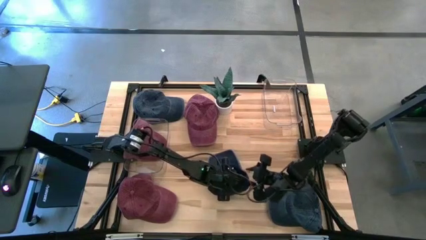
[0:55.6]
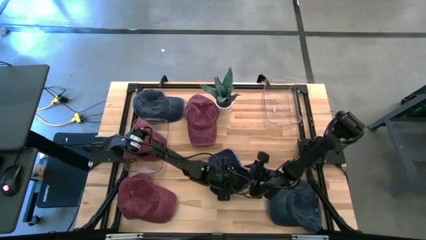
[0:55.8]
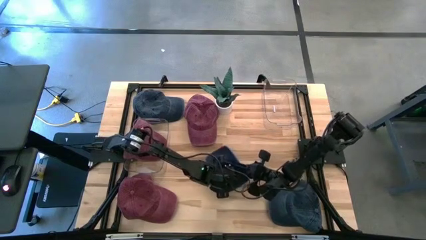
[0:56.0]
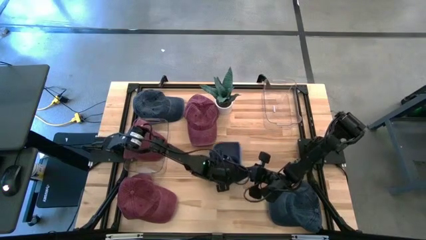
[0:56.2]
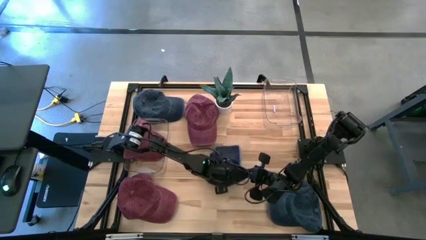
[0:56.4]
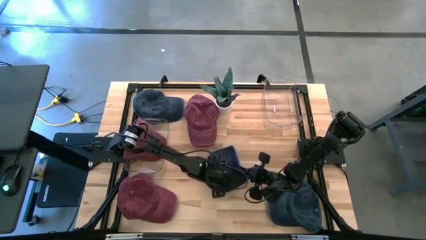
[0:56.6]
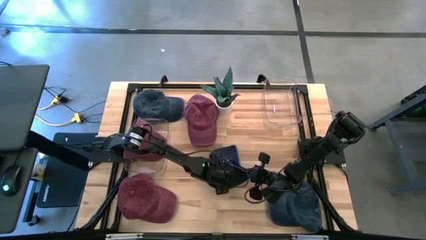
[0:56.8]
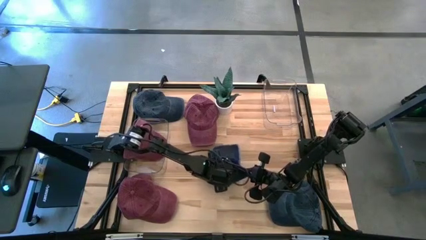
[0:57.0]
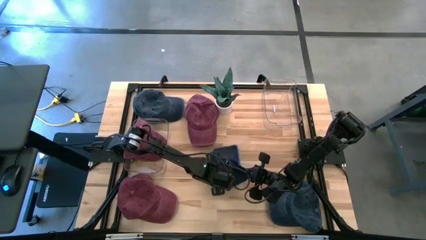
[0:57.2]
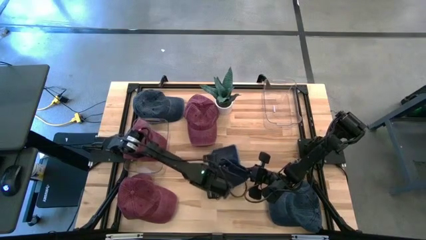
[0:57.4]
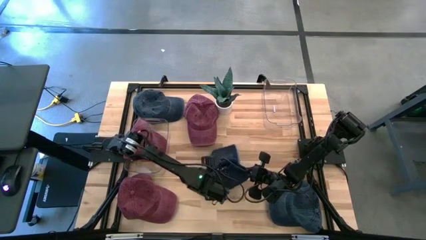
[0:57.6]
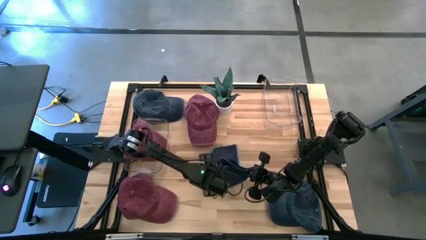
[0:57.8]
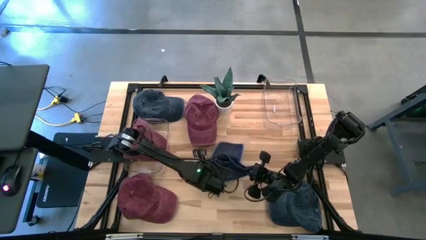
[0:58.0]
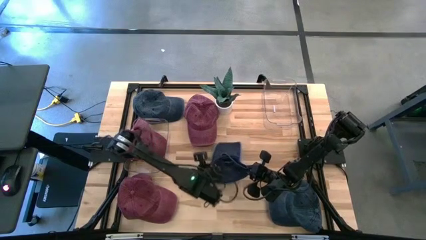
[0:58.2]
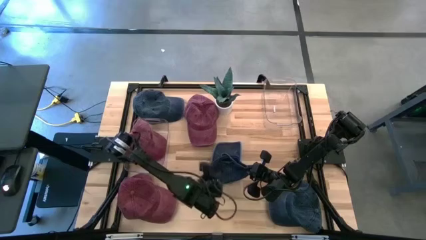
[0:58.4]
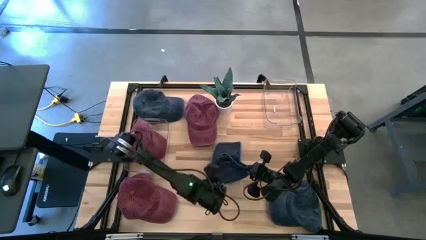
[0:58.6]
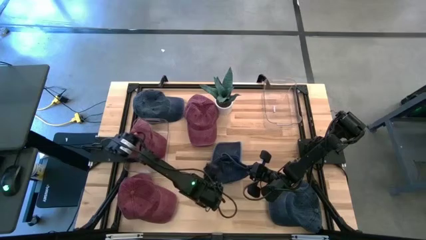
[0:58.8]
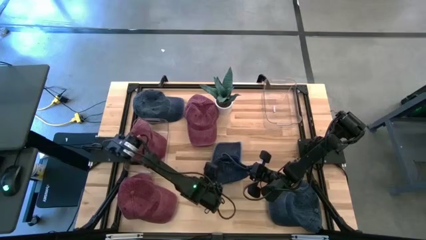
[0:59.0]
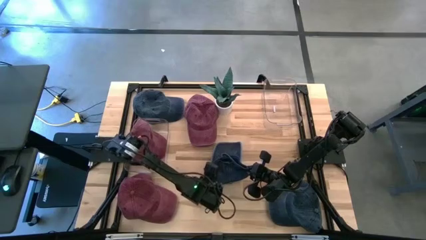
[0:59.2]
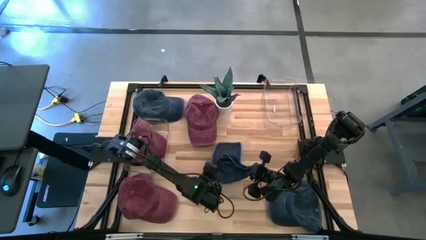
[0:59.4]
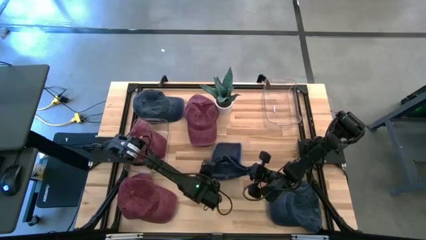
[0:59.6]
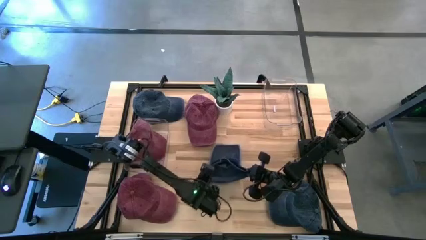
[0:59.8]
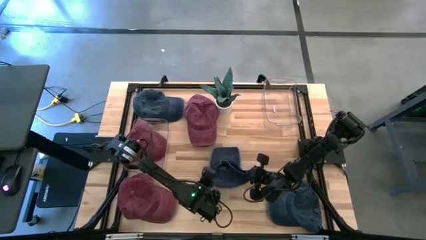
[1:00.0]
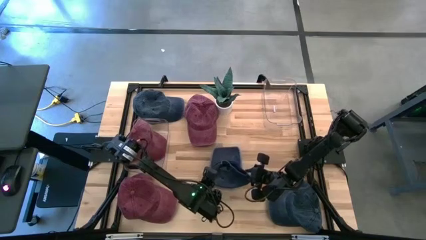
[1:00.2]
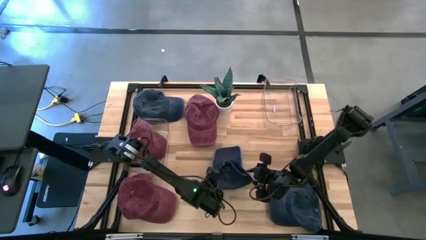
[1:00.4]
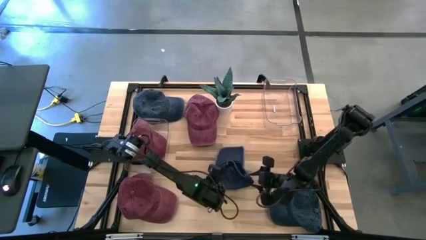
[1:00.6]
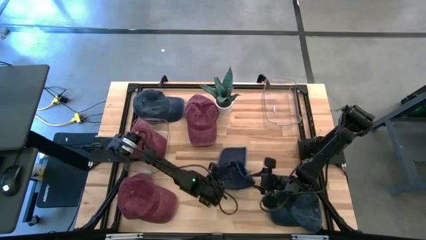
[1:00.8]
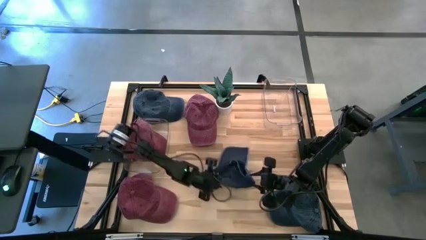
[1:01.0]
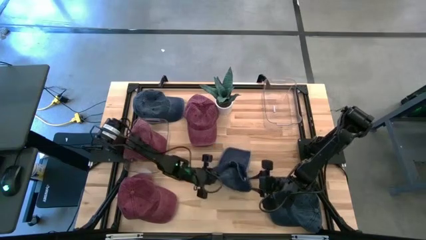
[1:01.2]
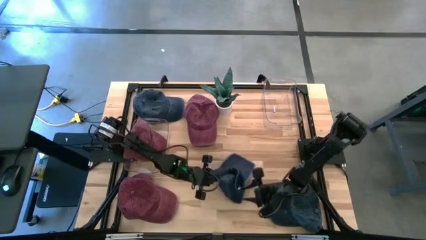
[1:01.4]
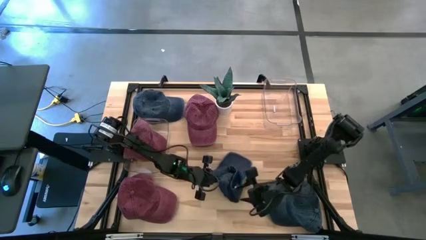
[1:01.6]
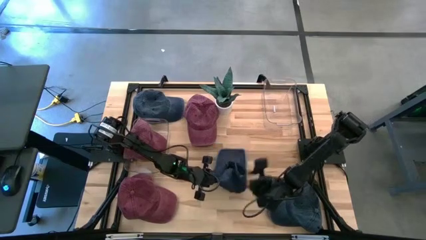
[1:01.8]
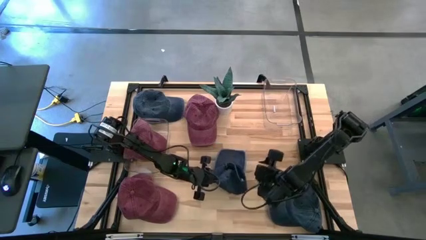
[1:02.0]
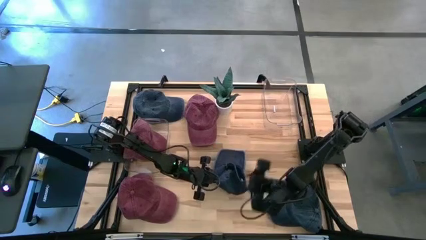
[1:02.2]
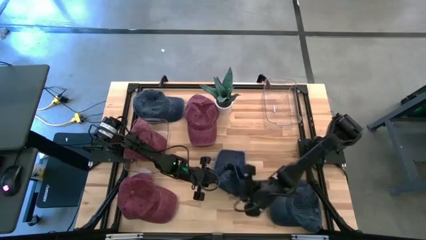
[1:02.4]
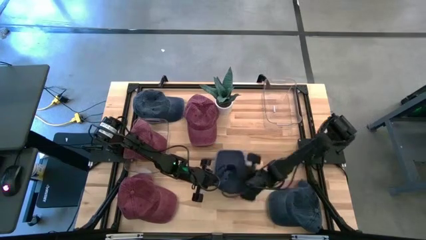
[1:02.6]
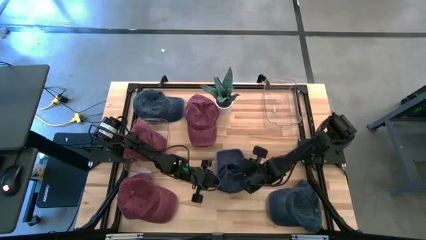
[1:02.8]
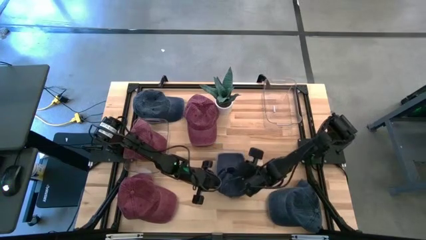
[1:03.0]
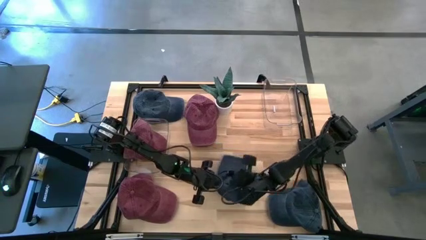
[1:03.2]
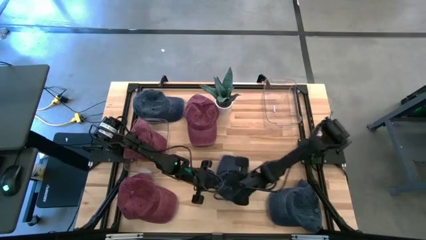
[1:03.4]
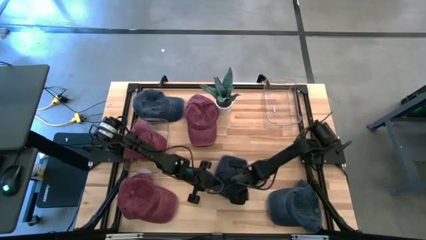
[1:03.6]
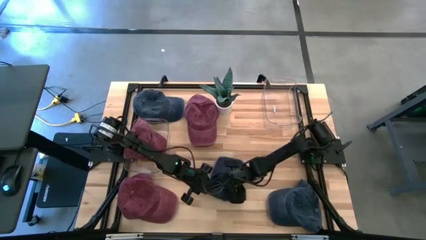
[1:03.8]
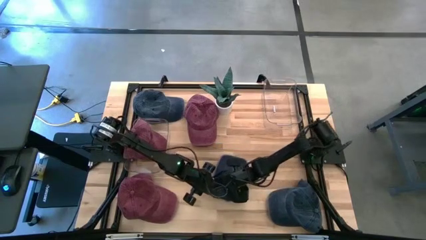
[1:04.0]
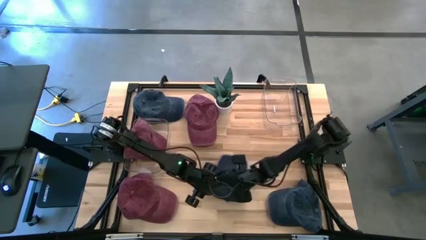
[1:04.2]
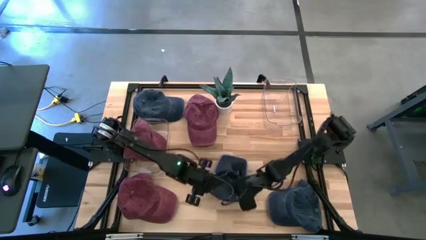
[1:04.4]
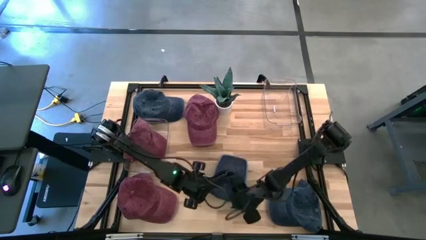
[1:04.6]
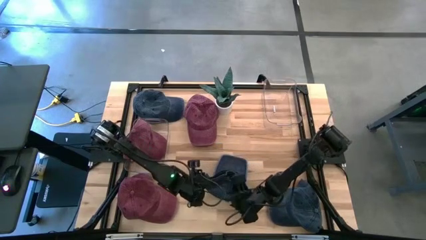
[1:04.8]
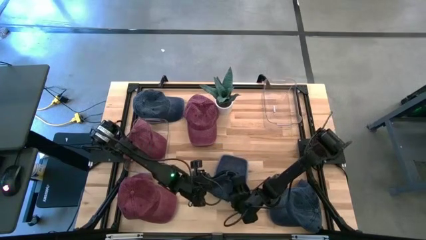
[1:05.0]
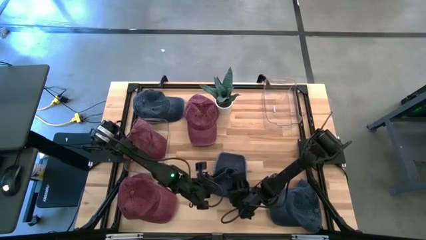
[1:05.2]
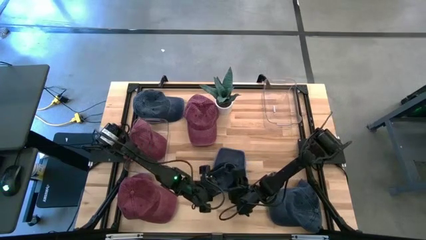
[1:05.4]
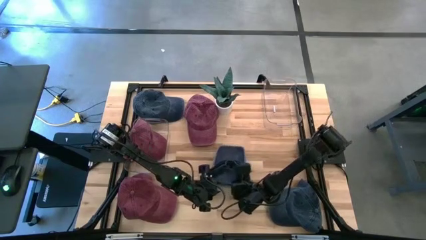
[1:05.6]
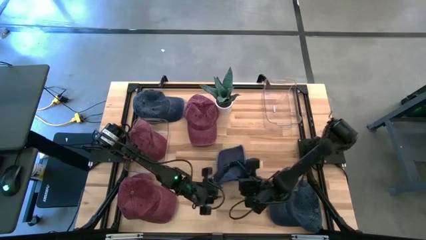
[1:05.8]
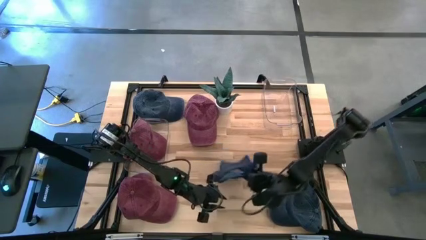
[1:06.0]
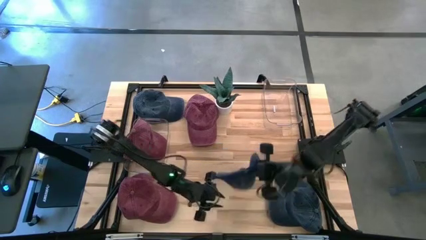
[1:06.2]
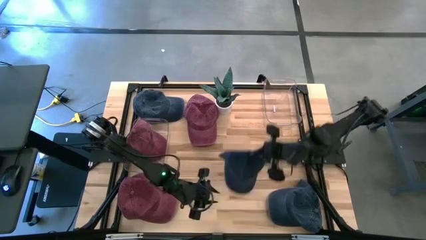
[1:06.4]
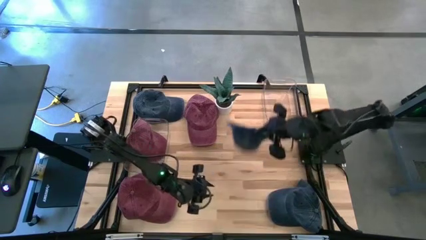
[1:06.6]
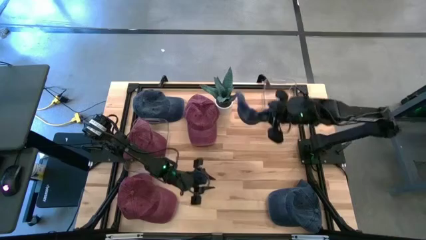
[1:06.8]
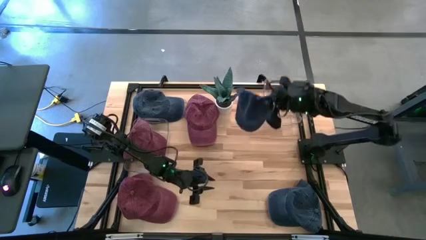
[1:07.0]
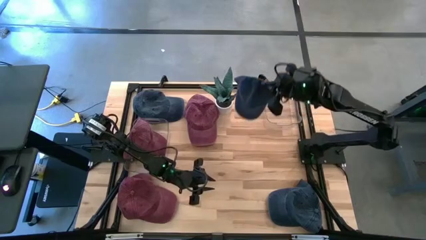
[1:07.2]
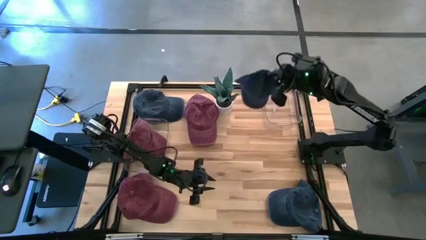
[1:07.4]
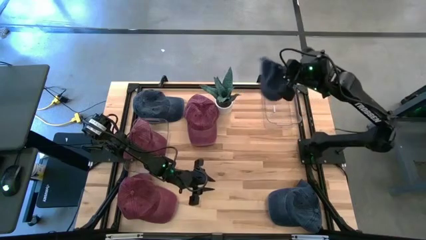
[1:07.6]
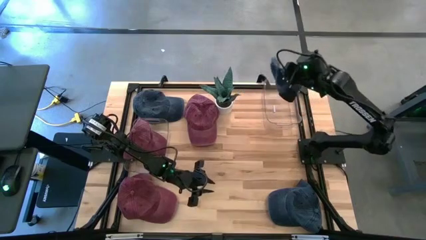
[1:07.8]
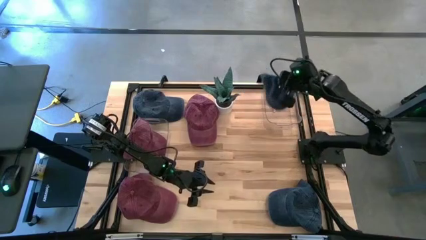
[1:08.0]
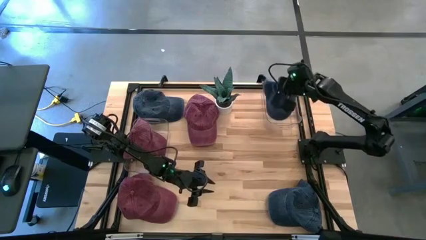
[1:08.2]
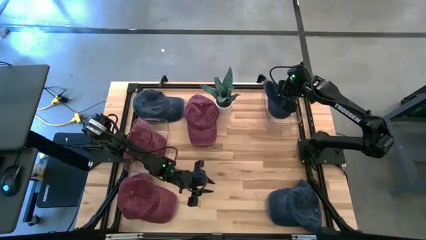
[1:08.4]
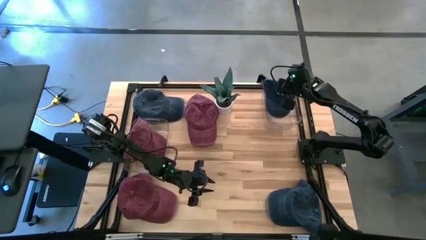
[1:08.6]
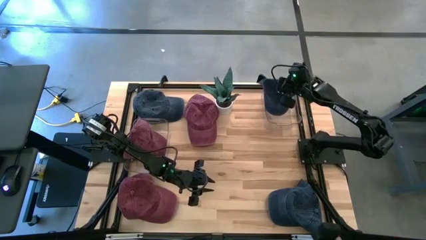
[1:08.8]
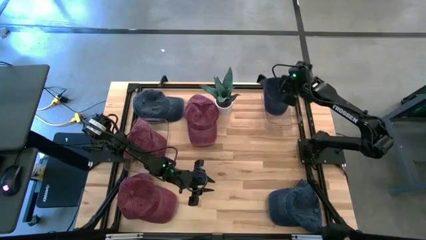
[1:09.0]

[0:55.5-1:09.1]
Task: Pick & Place hat
Put the middle blue cap into the right transparent bin
